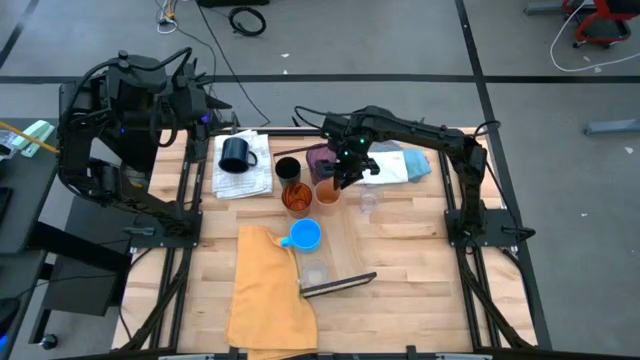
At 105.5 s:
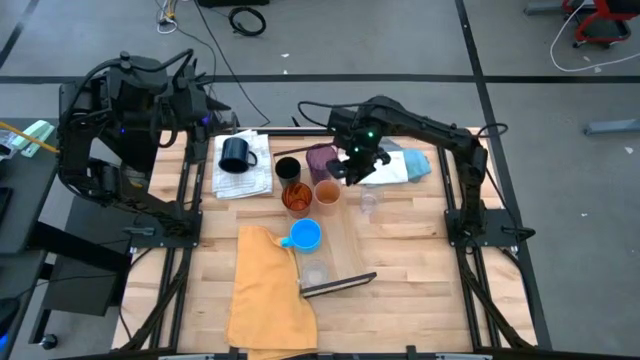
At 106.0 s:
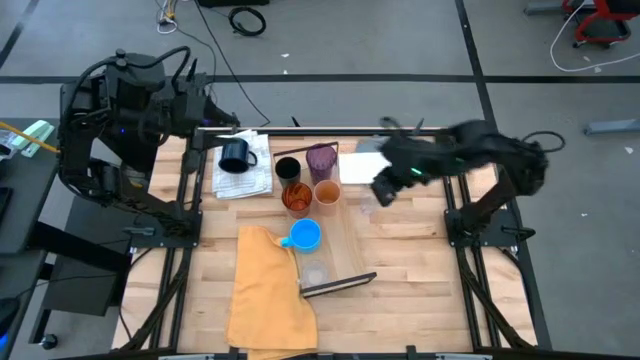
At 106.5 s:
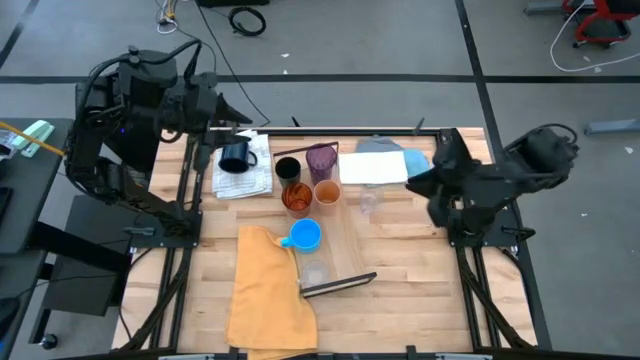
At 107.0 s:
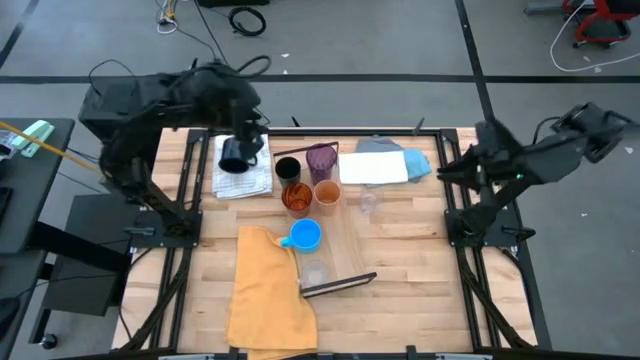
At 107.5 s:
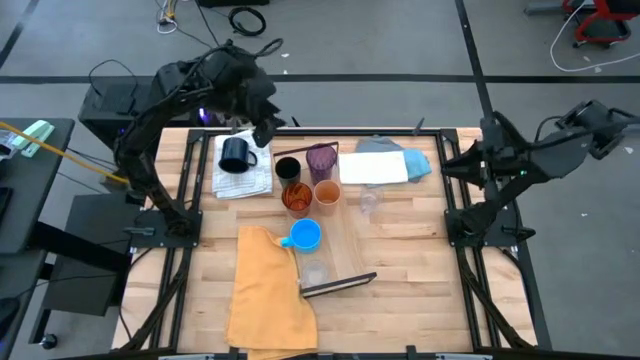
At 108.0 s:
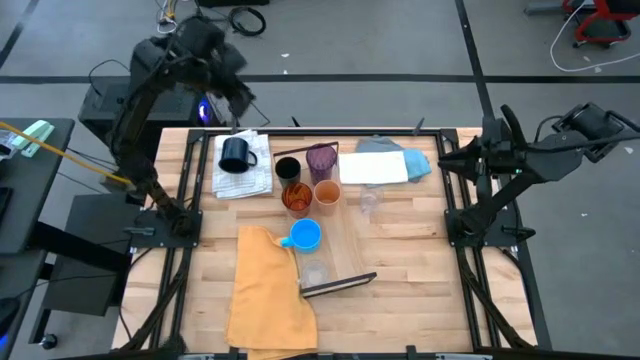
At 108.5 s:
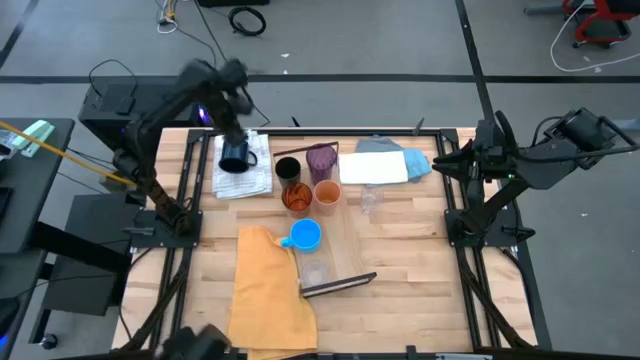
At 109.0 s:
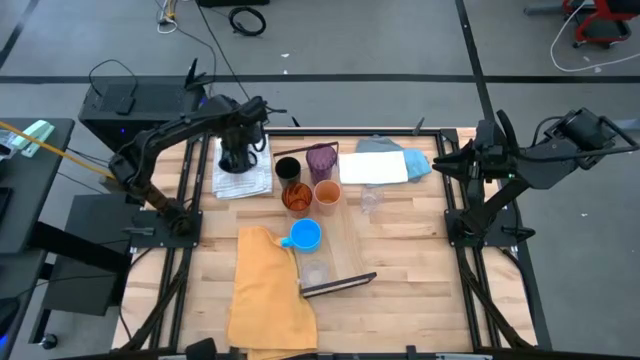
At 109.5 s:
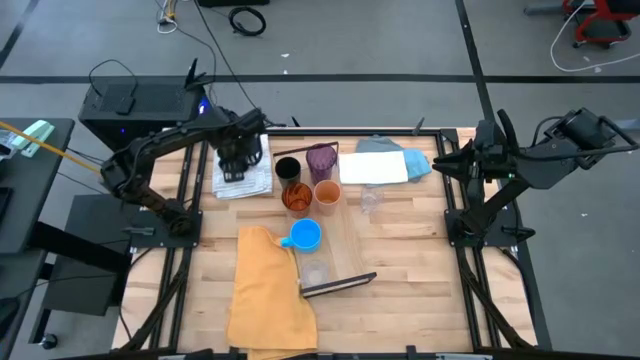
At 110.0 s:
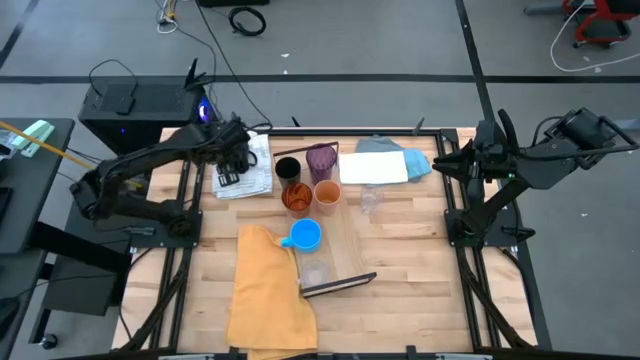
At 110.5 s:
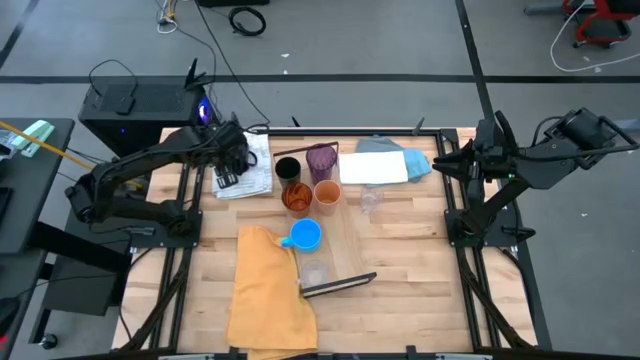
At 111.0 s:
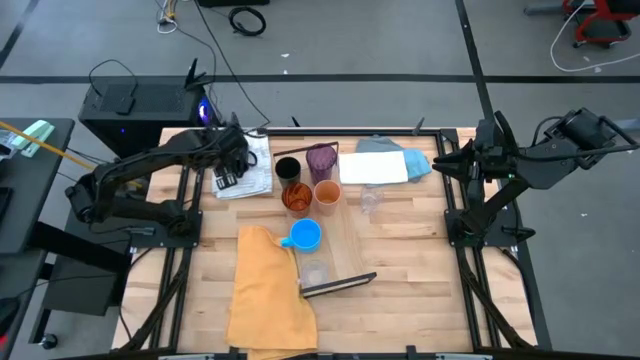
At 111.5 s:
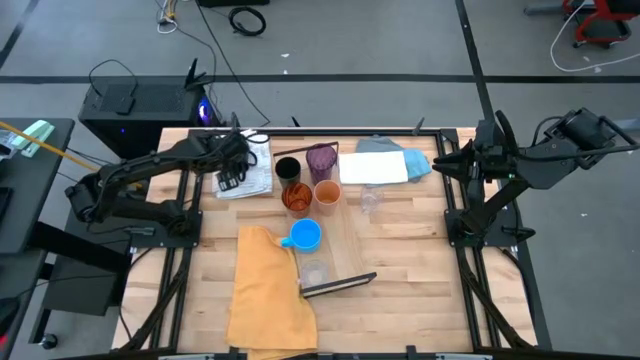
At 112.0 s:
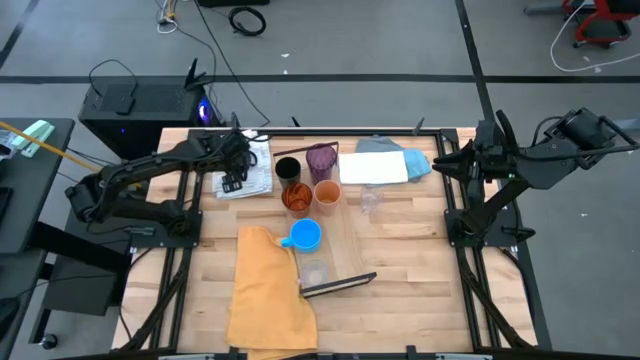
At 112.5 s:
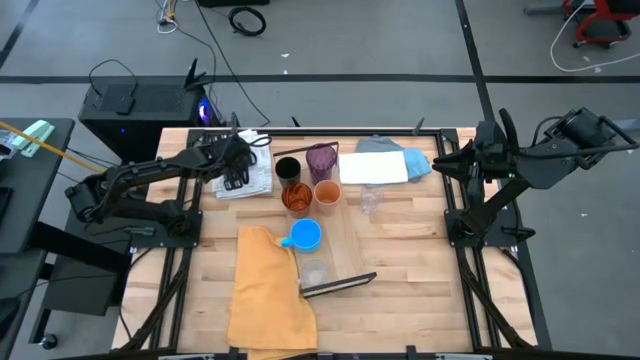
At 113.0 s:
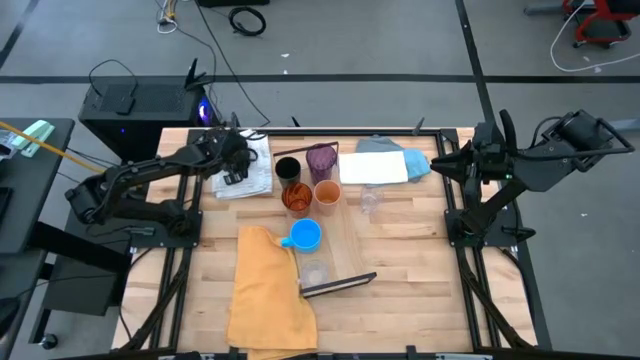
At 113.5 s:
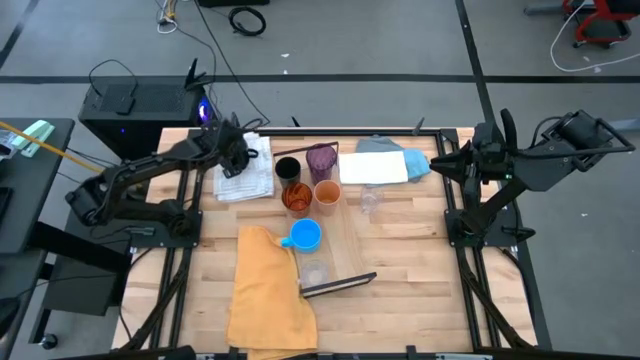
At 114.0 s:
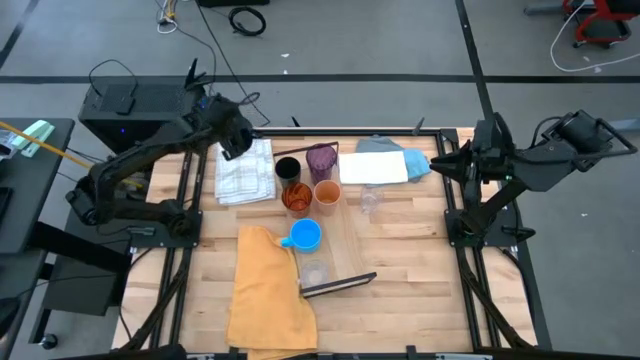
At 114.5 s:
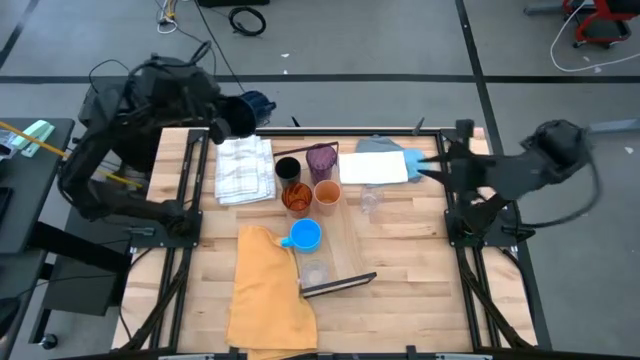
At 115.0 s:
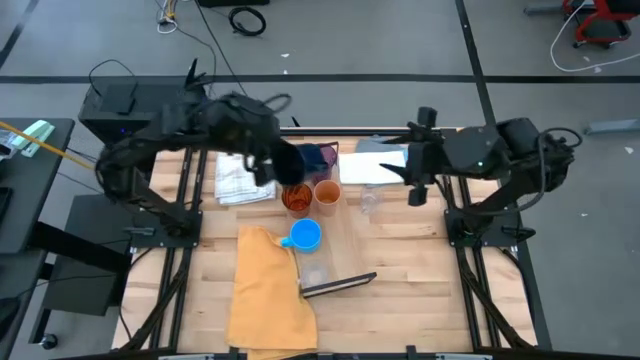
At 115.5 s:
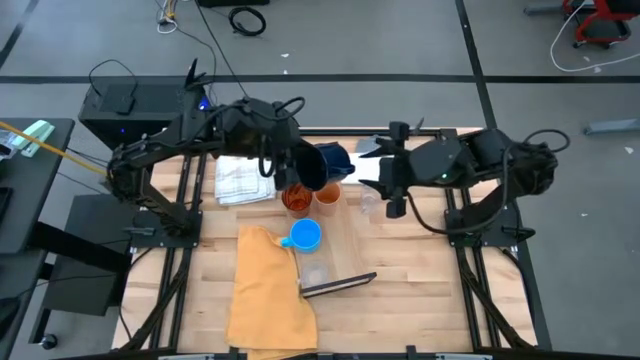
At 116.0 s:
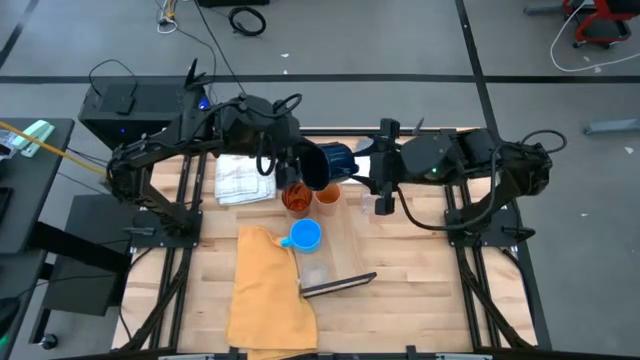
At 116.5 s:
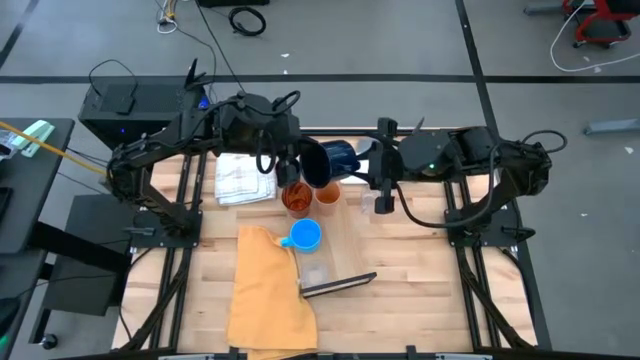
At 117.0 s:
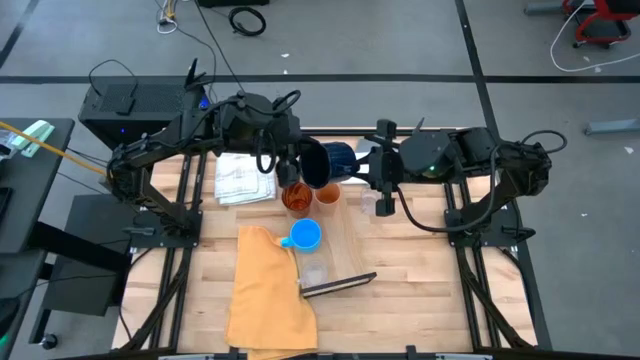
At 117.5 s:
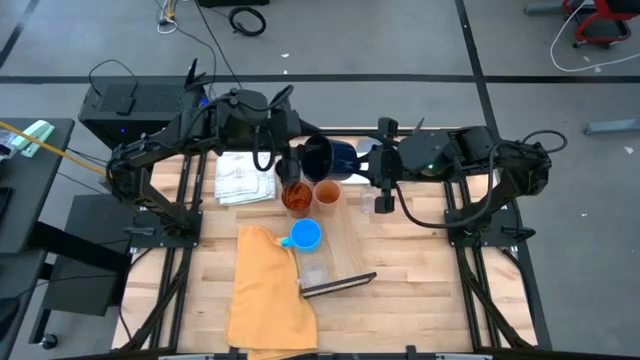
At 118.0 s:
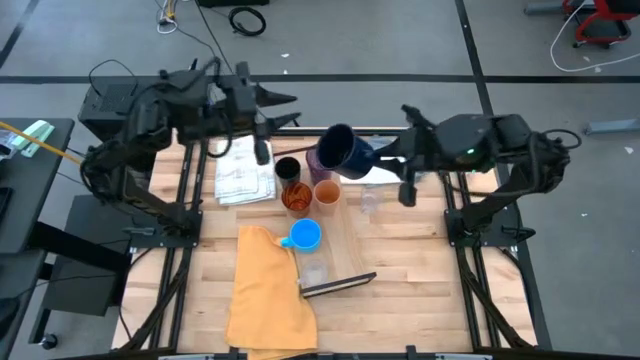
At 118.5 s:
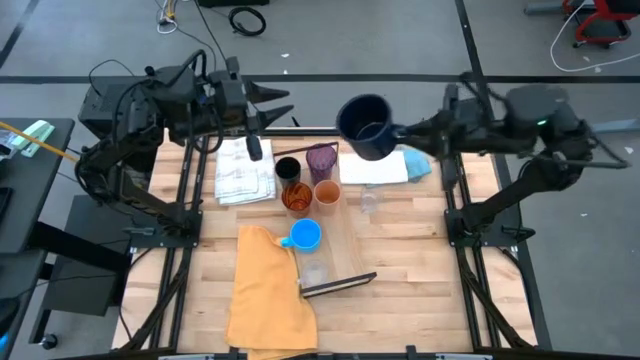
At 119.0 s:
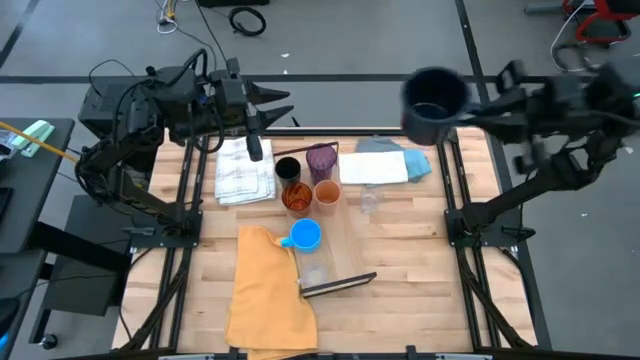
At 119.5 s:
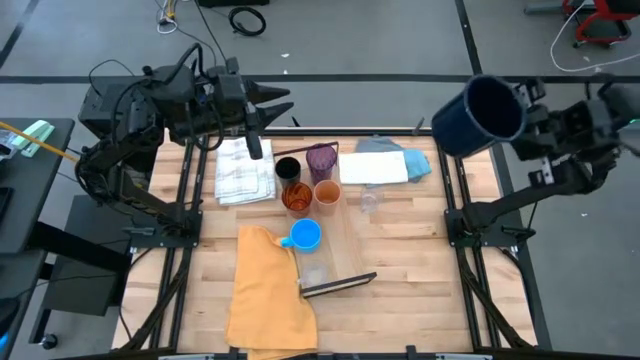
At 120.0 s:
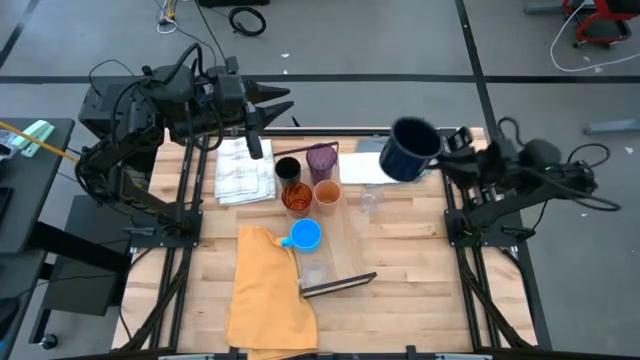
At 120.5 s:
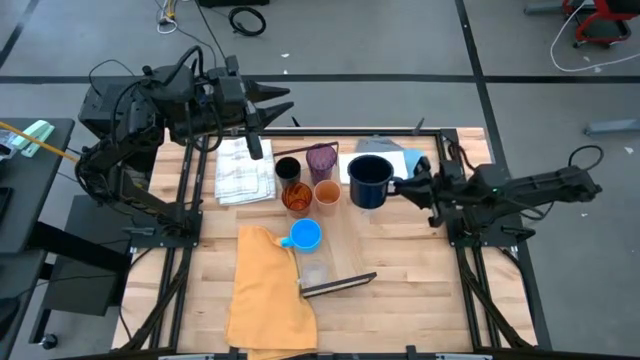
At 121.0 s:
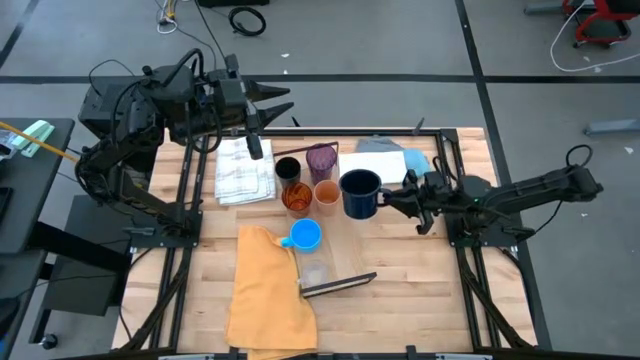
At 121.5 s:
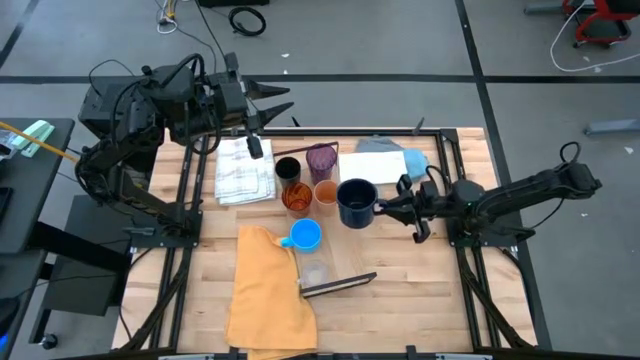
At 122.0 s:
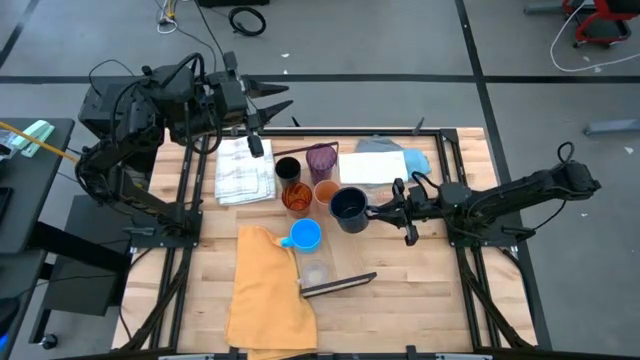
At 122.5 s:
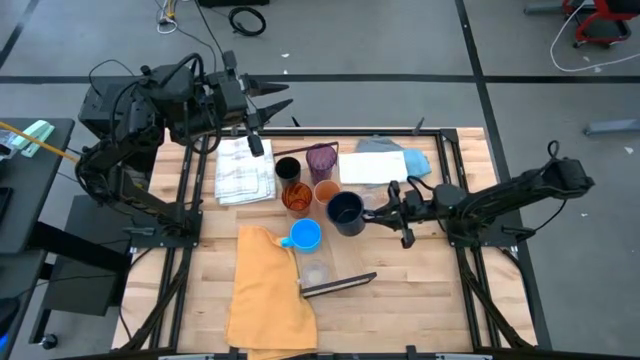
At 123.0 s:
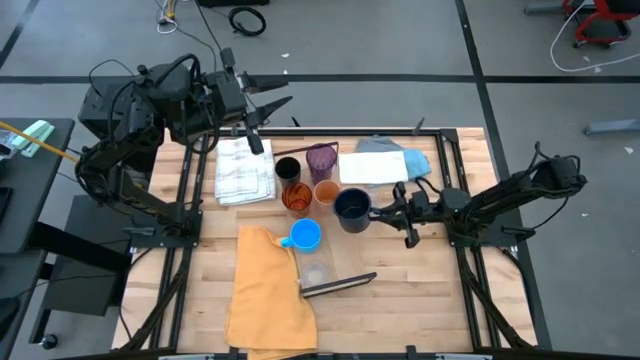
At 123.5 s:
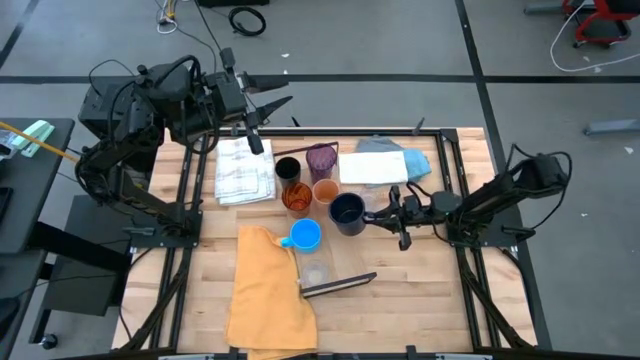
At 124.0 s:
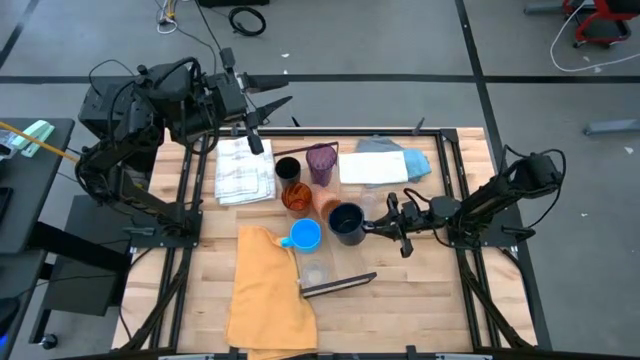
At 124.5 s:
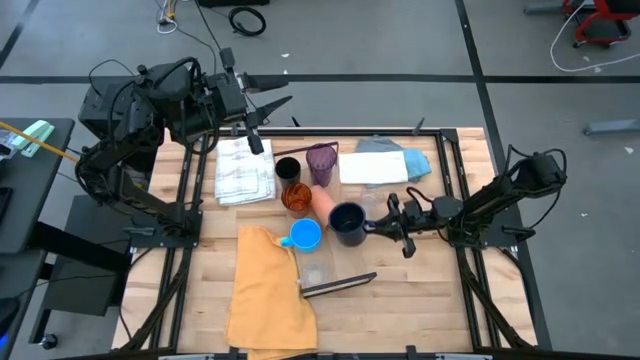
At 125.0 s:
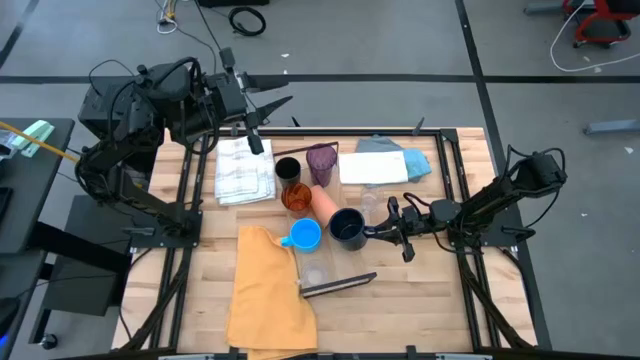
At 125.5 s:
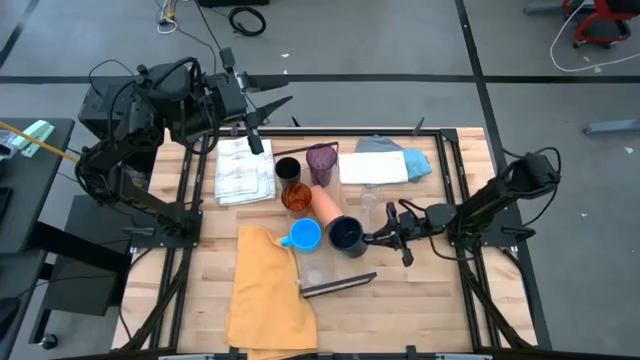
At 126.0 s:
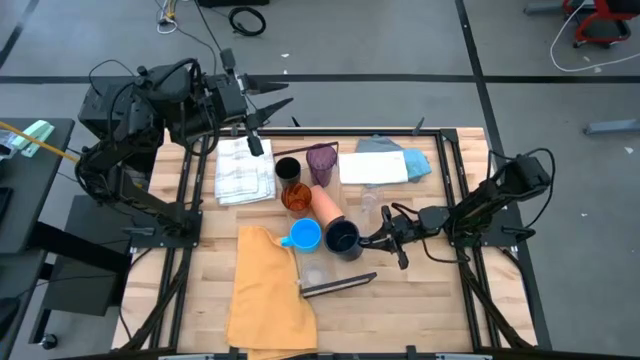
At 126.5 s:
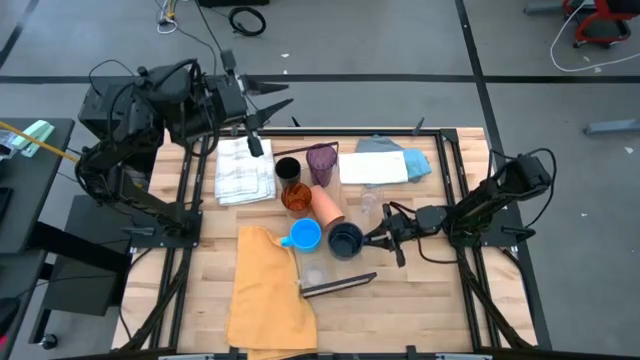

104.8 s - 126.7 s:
Task: Stack small to large cups/mugs on shelf
Put the dark blue mug on the shelf
